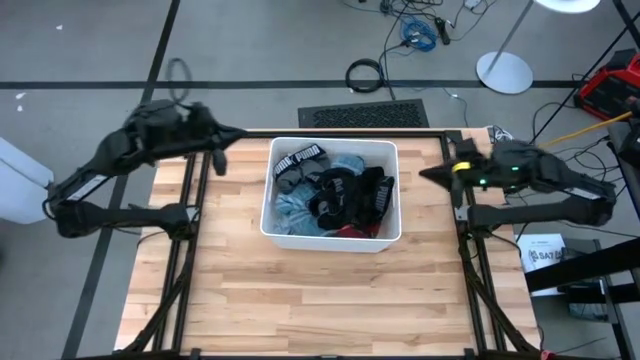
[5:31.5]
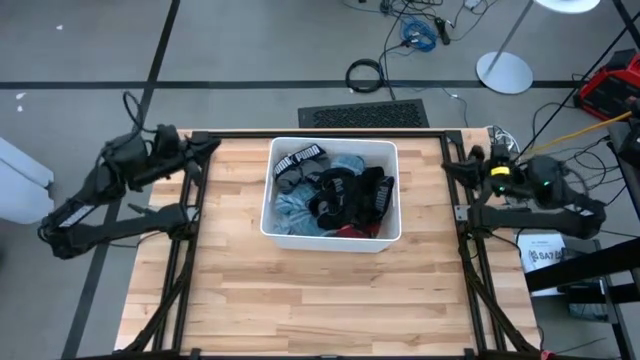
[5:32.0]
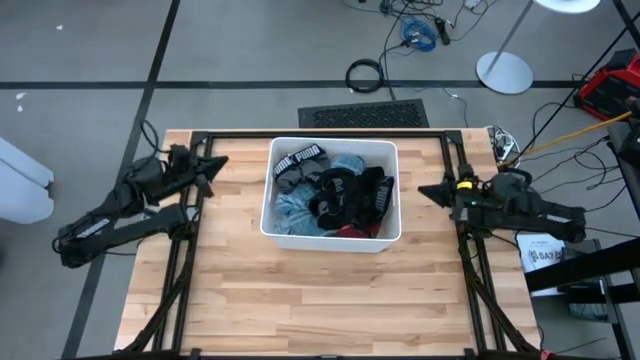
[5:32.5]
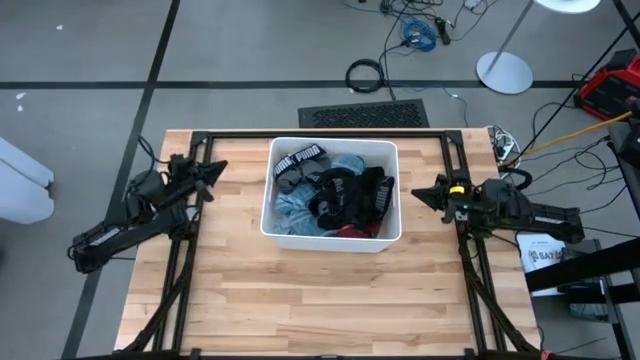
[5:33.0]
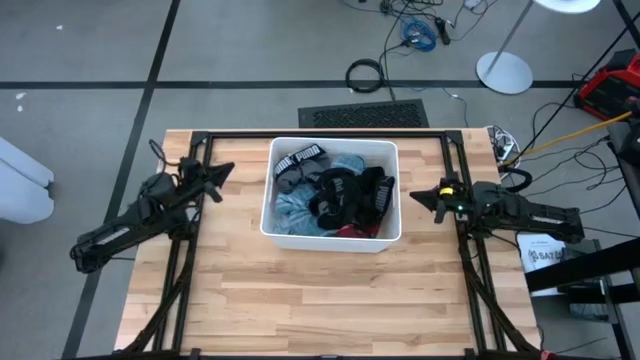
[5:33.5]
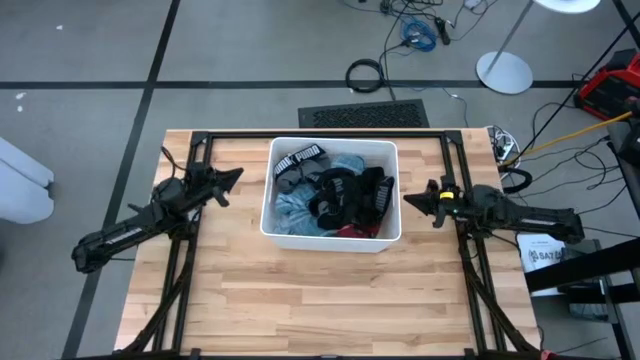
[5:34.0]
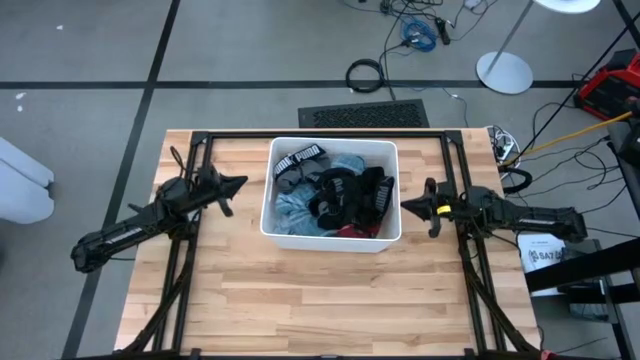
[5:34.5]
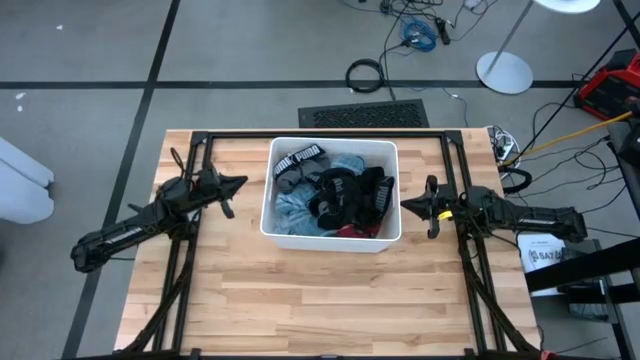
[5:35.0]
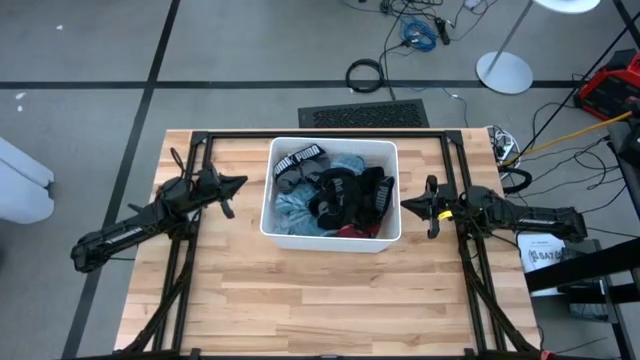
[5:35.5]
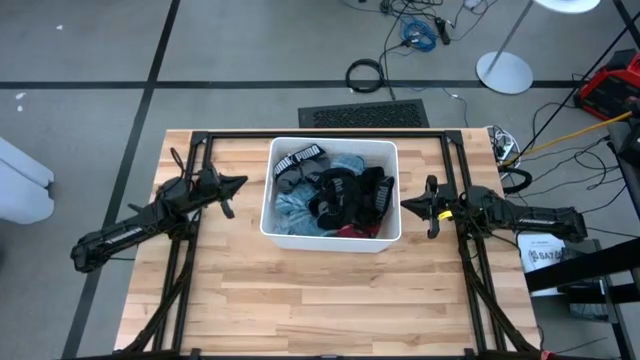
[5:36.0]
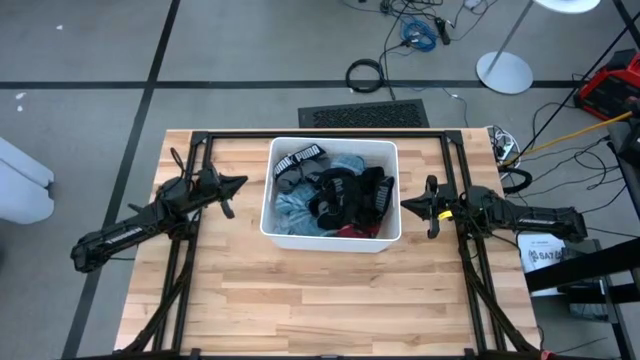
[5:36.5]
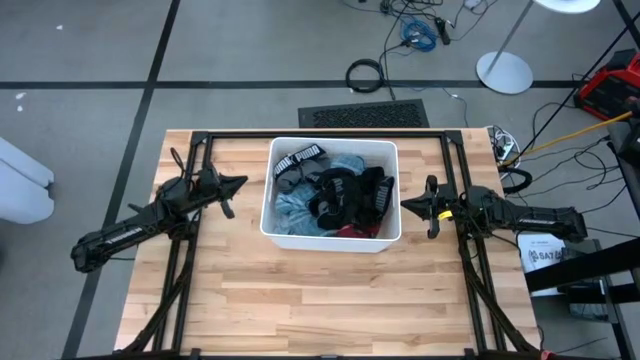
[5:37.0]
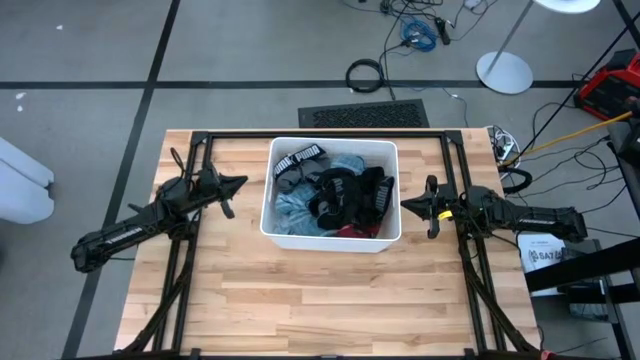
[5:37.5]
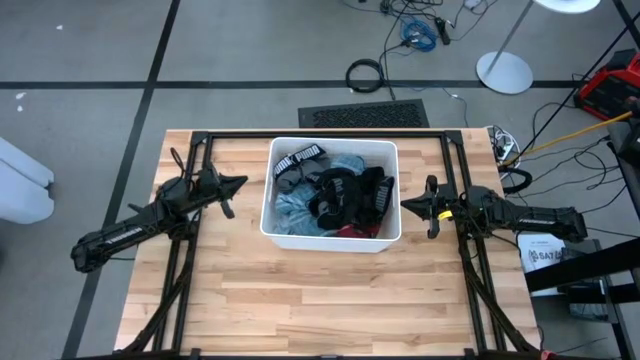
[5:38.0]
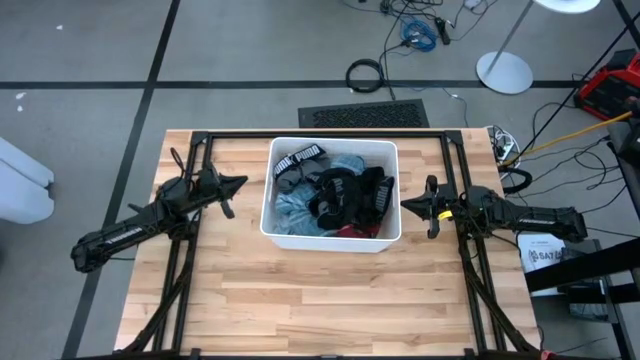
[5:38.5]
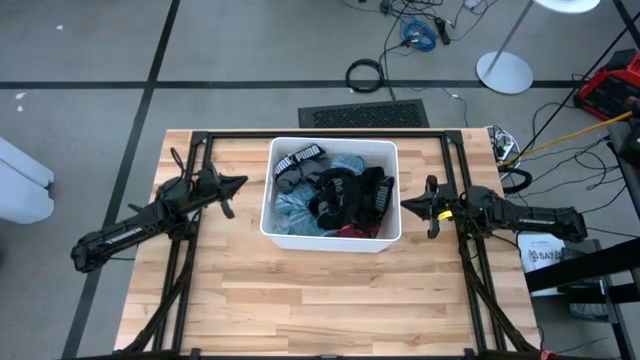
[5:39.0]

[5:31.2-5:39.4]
Task: Sort clothes
Return to Home Position

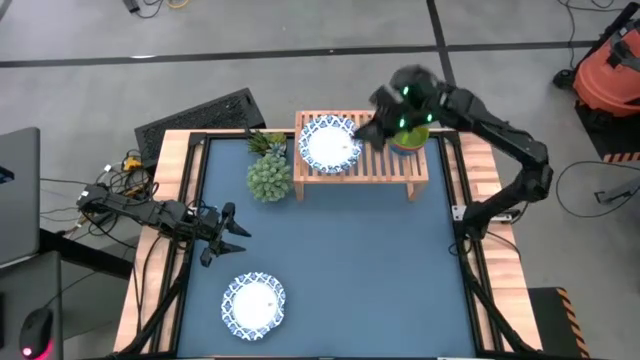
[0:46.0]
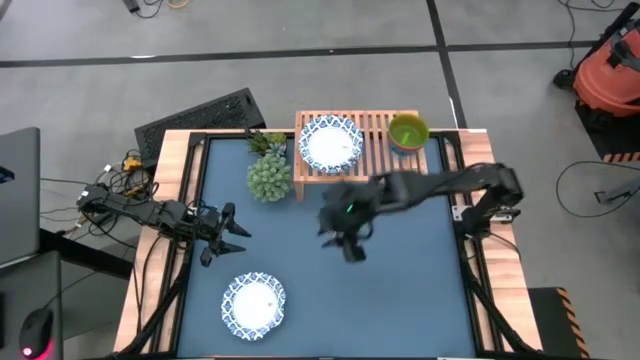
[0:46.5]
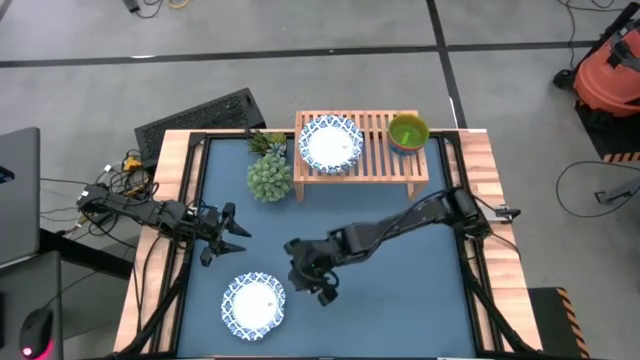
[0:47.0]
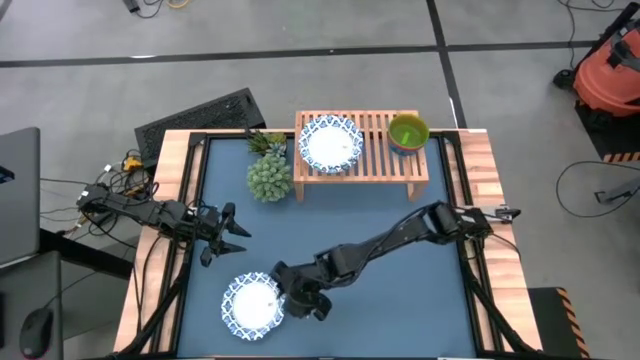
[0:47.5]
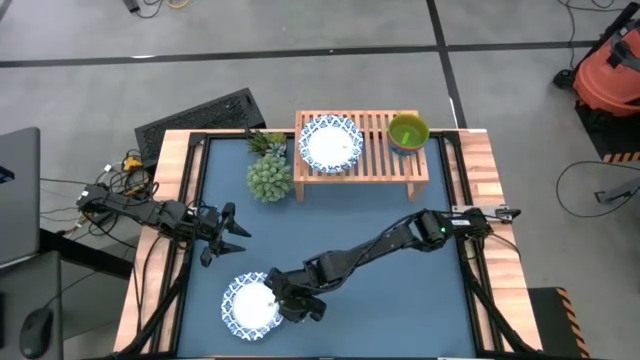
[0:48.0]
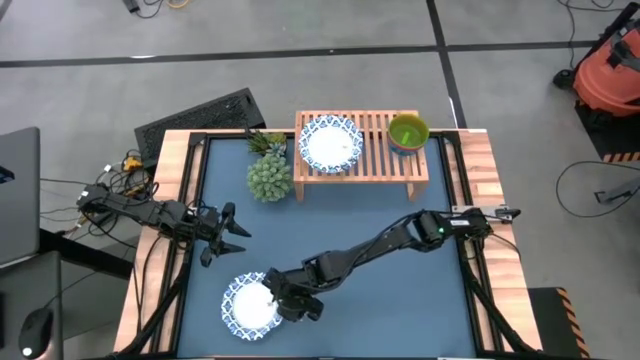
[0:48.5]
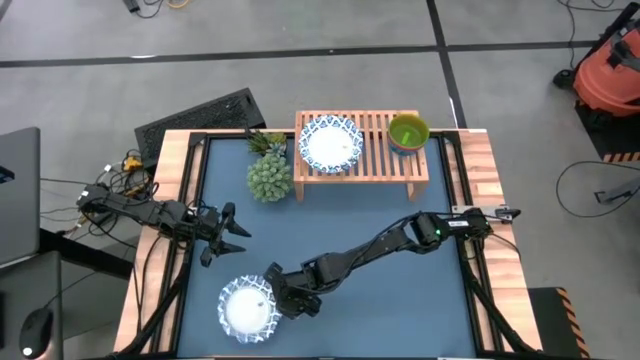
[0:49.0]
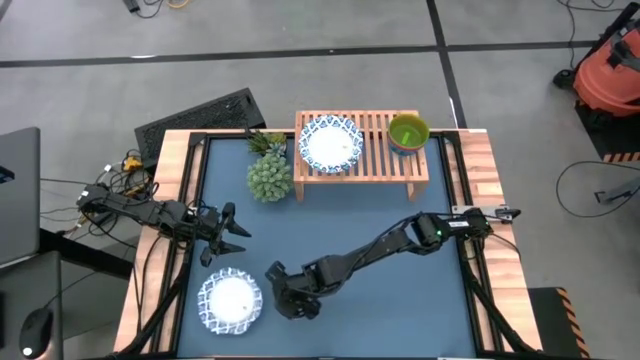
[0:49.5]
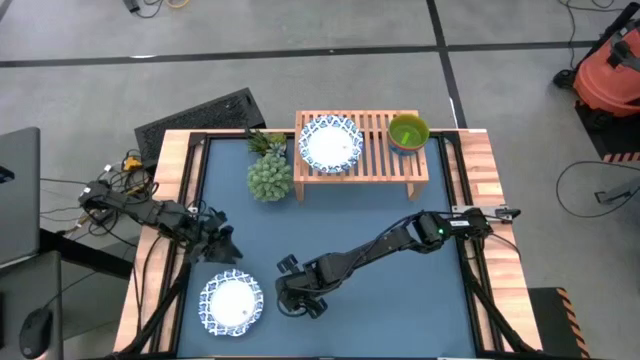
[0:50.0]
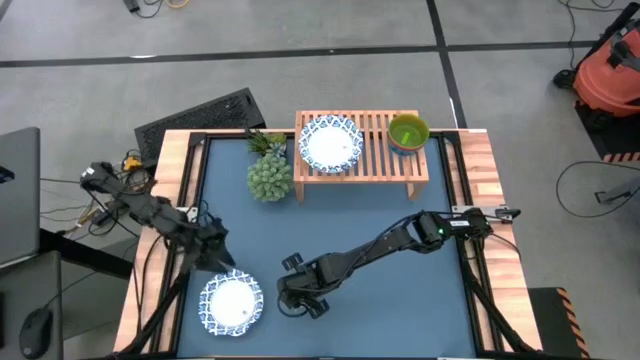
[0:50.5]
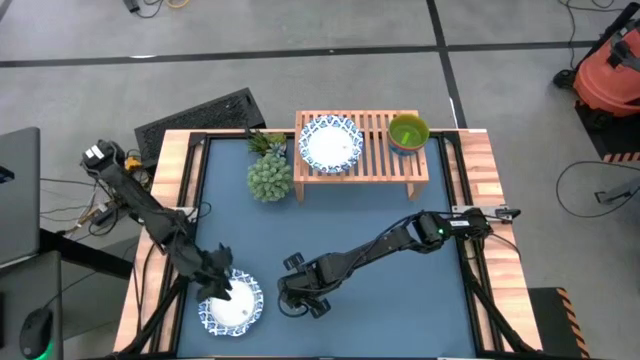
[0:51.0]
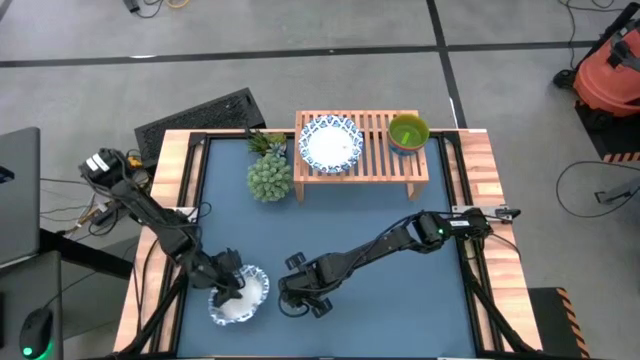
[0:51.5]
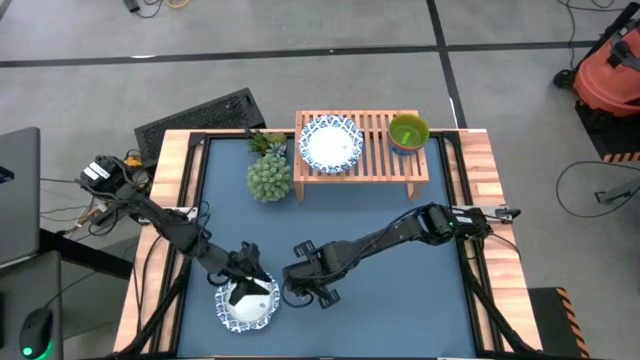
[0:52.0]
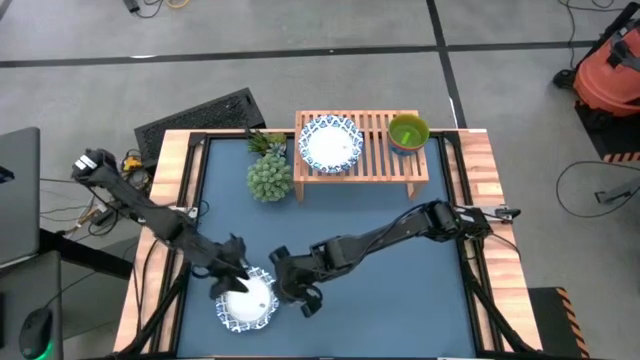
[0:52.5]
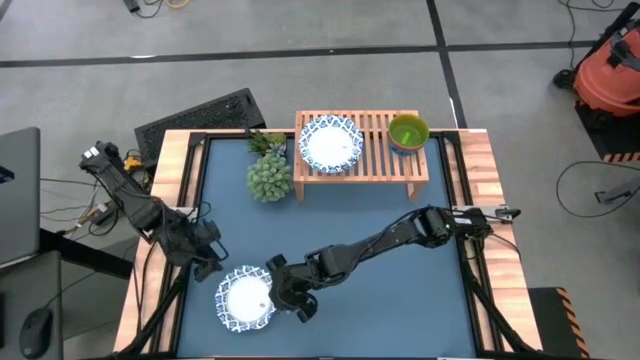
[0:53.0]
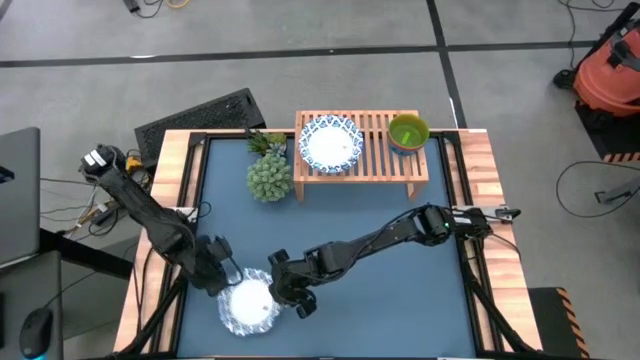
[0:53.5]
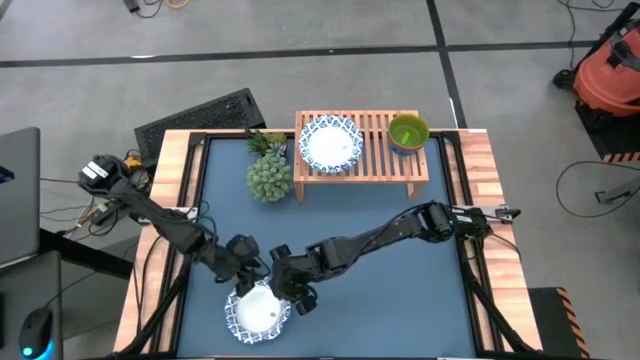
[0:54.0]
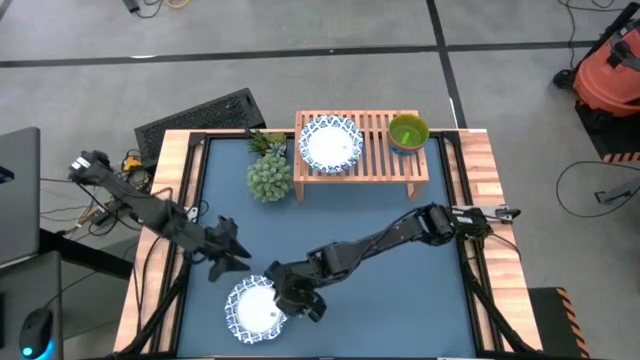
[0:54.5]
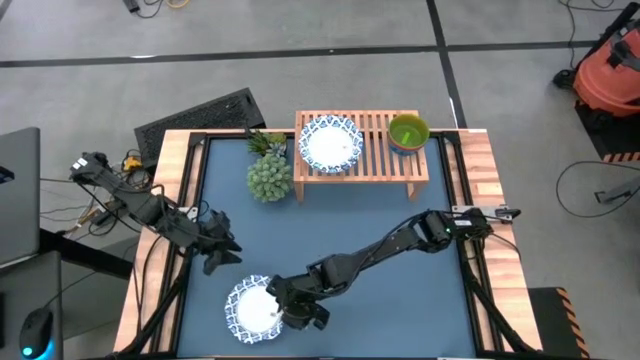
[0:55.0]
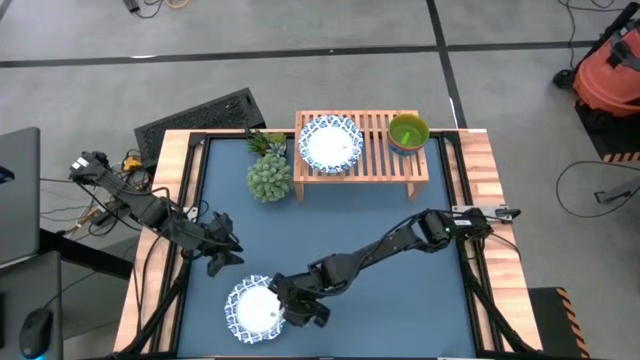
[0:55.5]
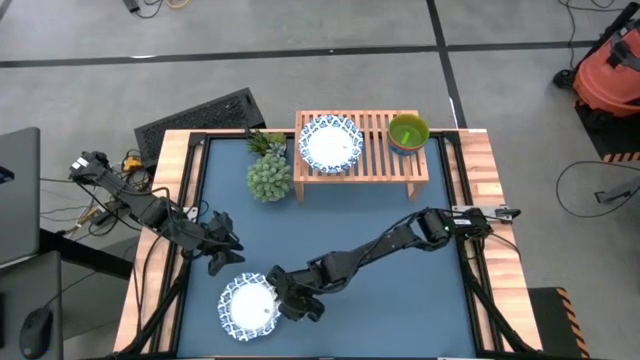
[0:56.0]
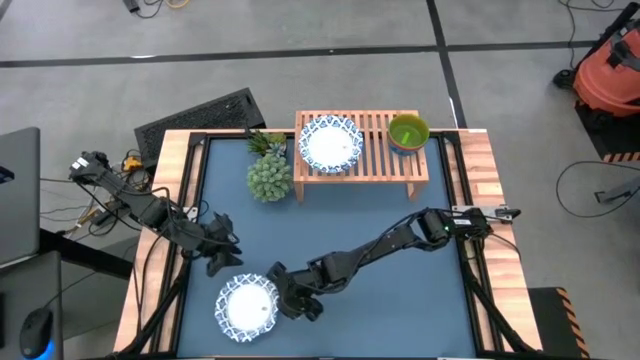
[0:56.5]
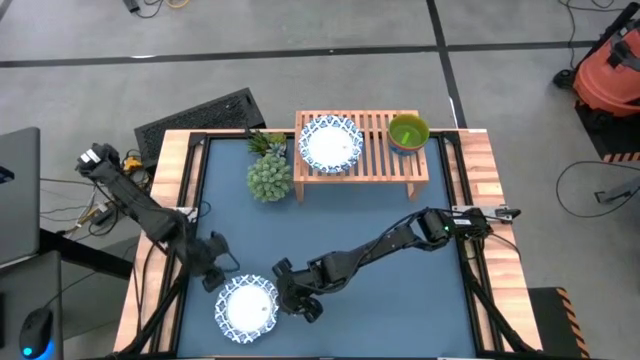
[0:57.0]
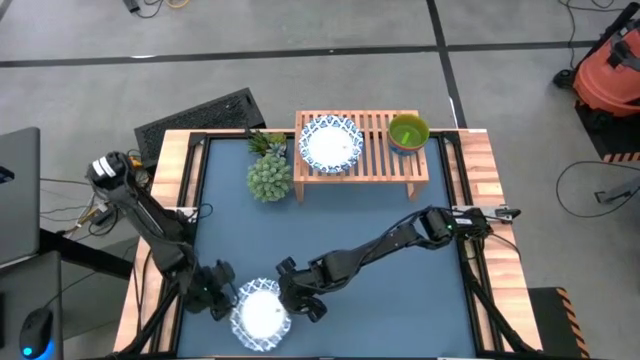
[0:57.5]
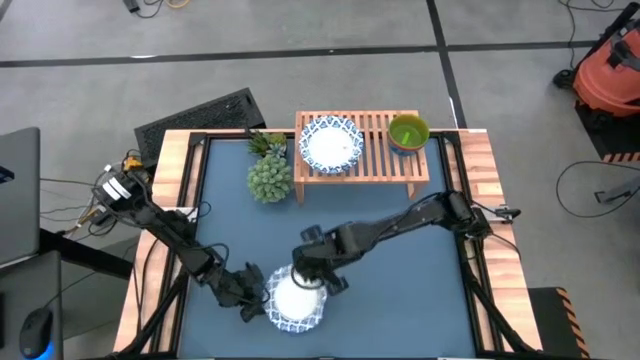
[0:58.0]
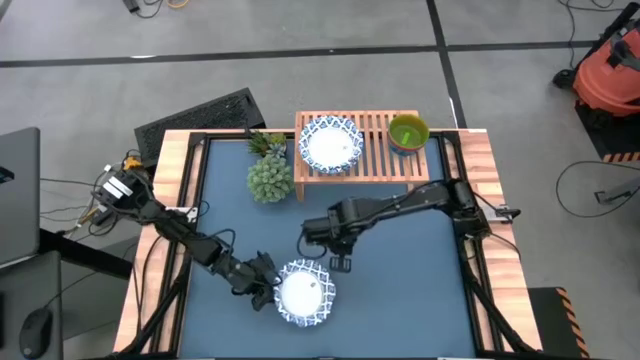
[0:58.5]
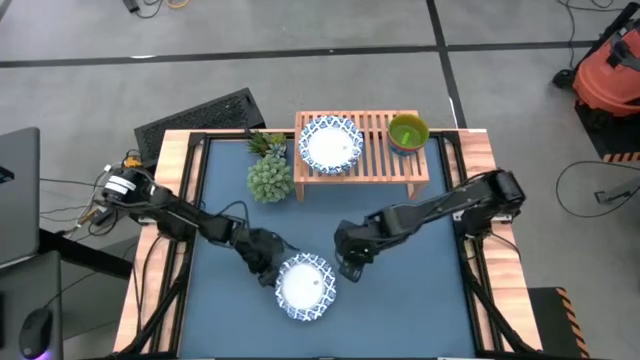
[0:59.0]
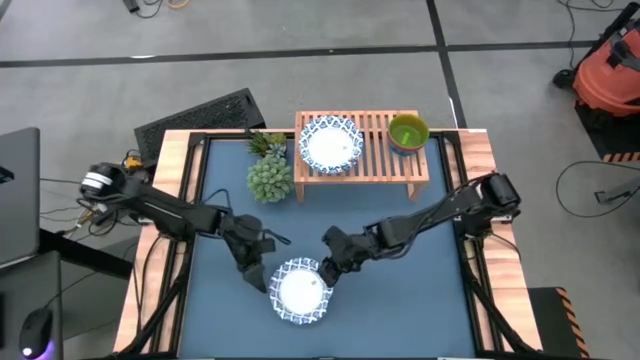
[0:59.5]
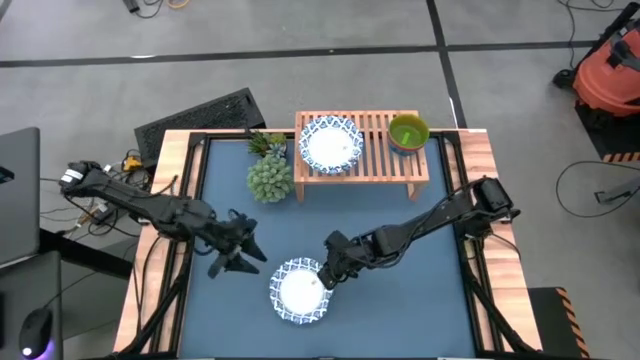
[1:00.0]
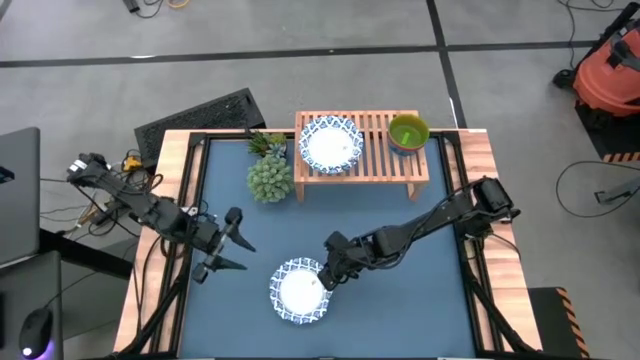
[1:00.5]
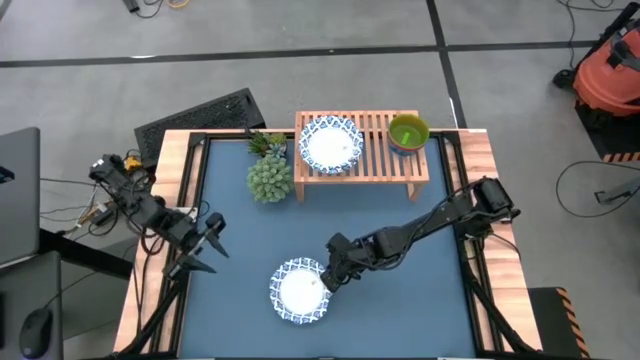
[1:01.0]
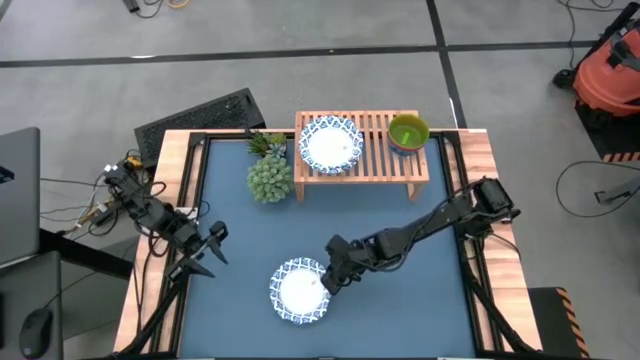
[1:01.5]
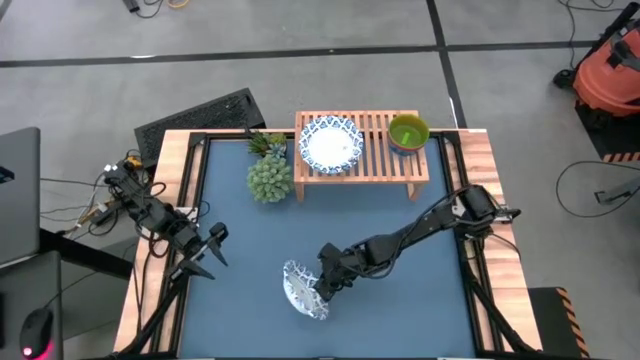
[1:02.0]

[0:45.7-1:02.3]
Task: Place and stack bowls onto a shelf
Stack the white bowl on top of the white bowl on the shelf
